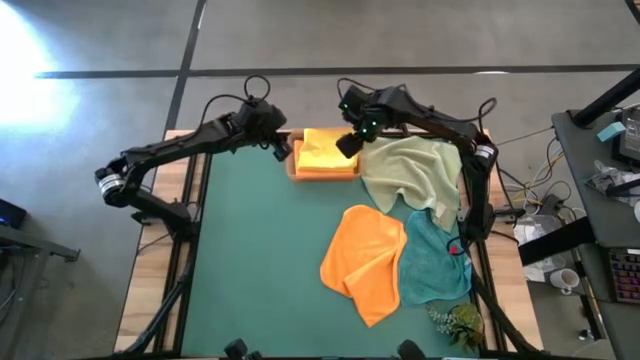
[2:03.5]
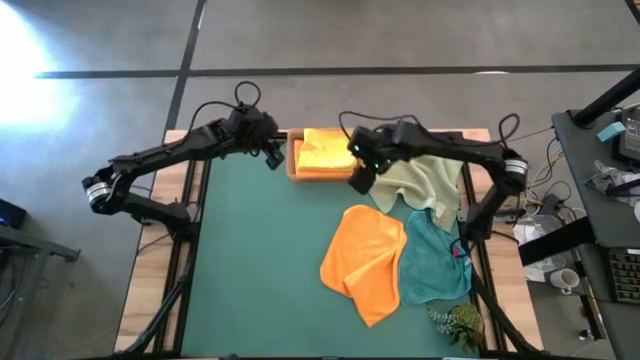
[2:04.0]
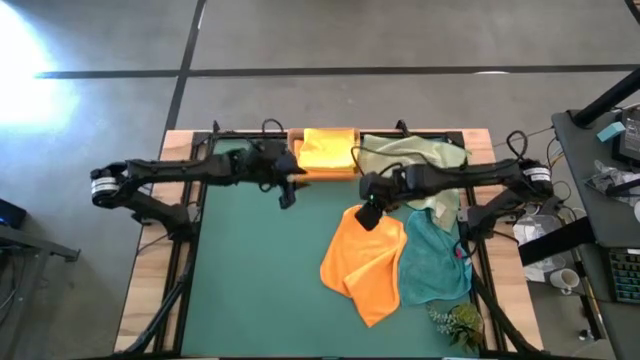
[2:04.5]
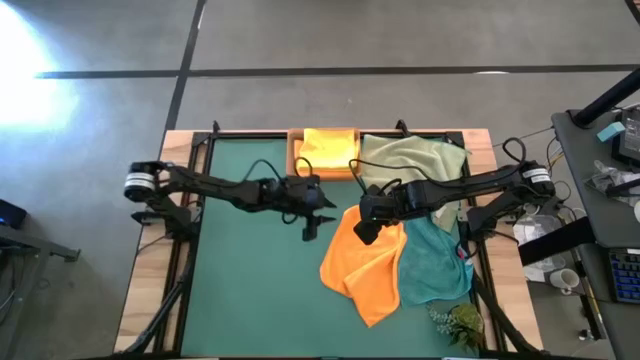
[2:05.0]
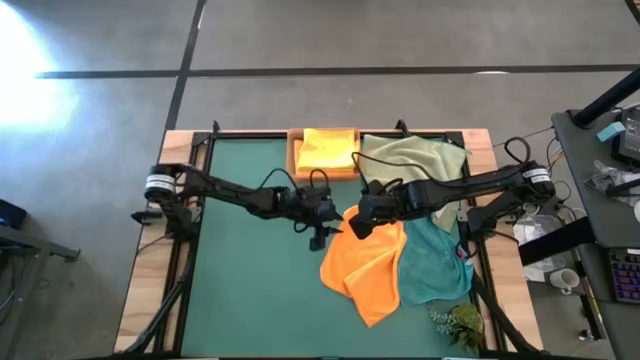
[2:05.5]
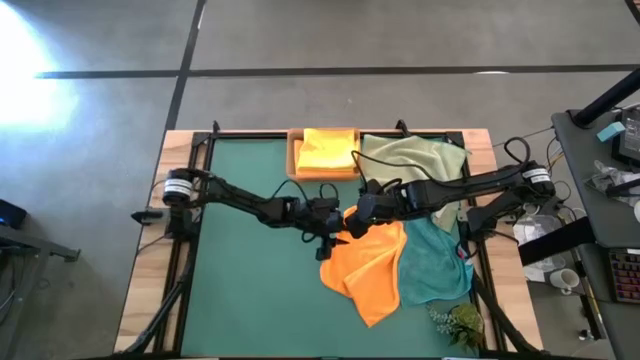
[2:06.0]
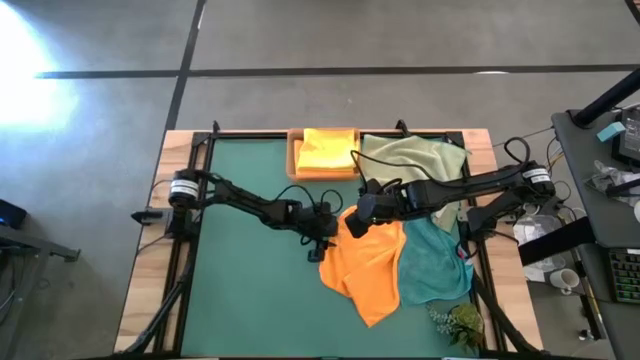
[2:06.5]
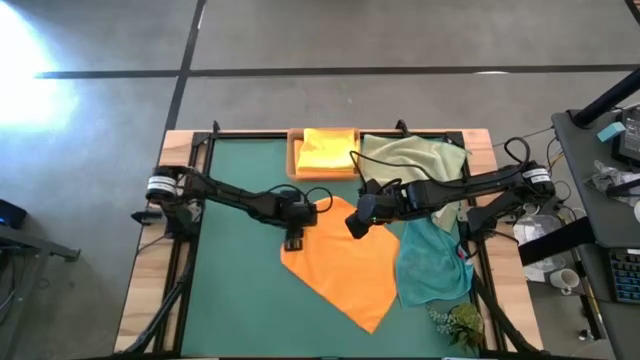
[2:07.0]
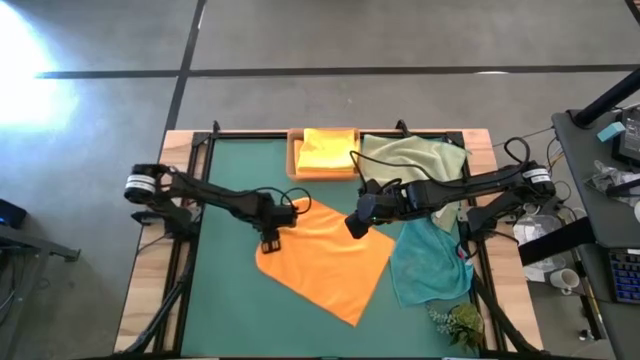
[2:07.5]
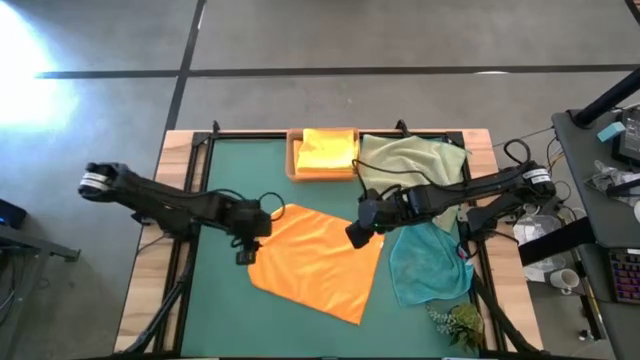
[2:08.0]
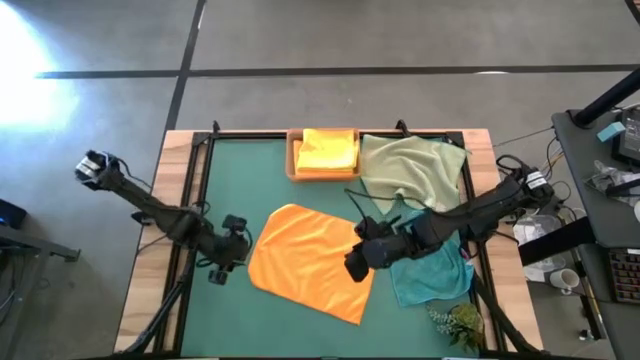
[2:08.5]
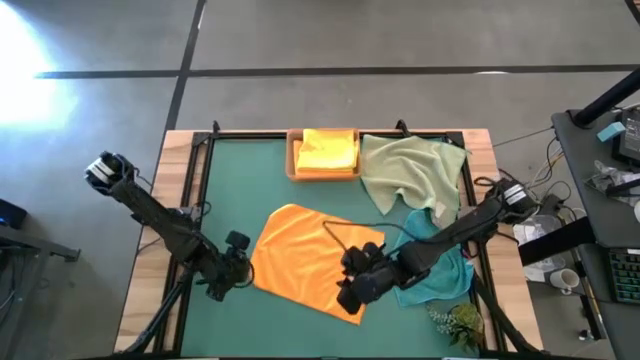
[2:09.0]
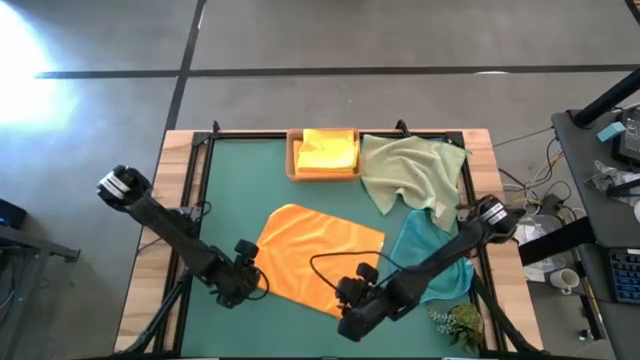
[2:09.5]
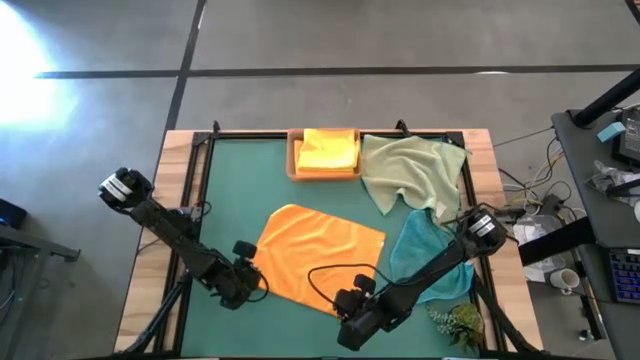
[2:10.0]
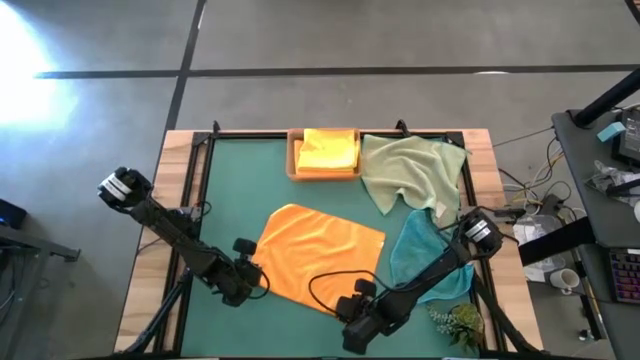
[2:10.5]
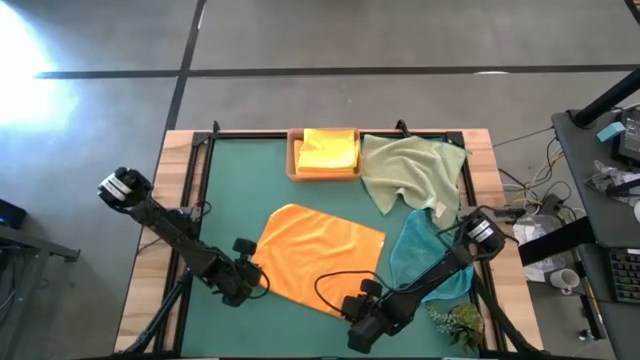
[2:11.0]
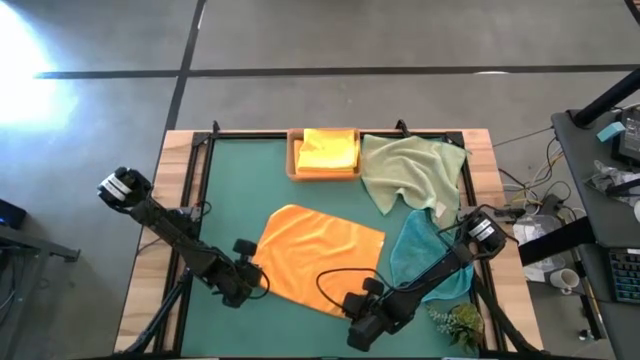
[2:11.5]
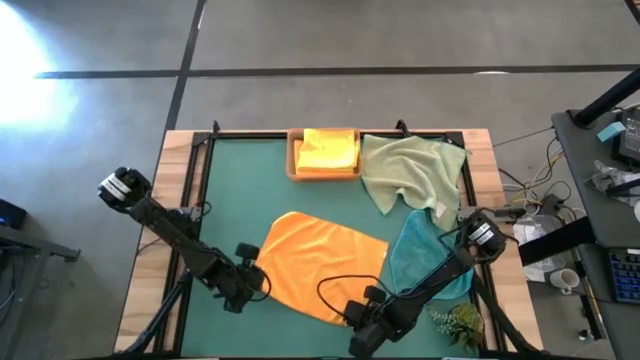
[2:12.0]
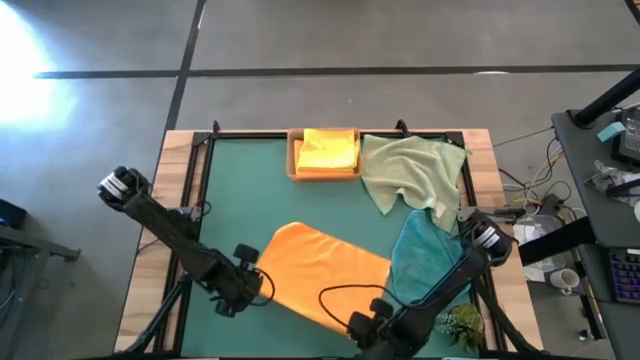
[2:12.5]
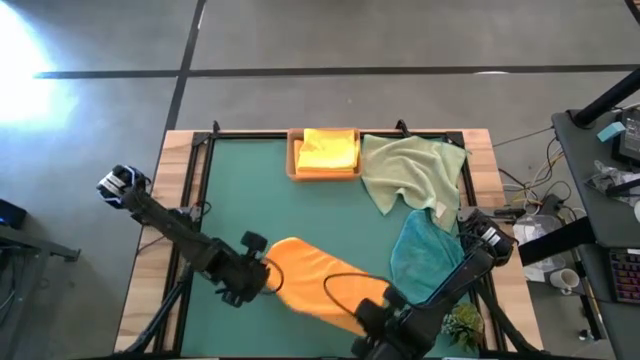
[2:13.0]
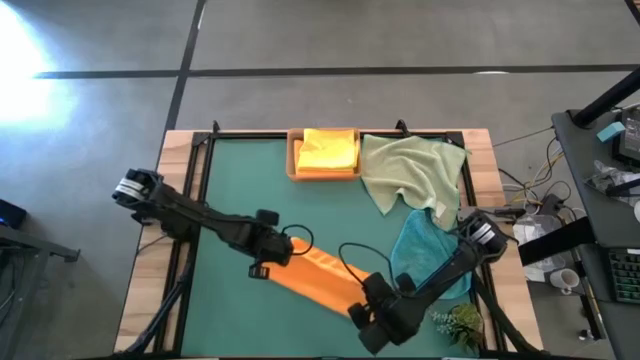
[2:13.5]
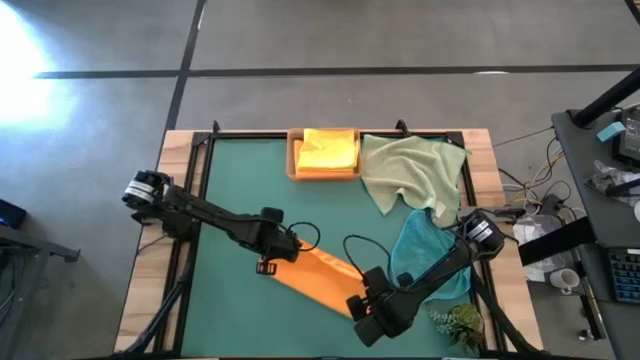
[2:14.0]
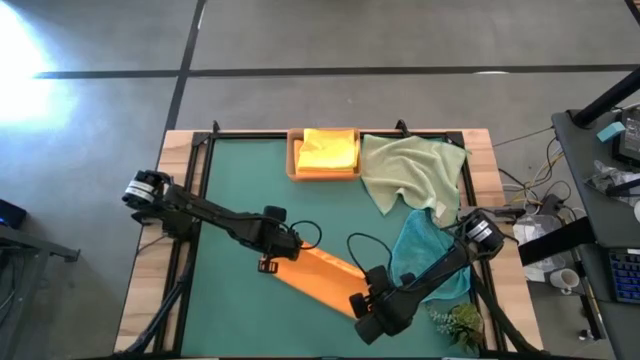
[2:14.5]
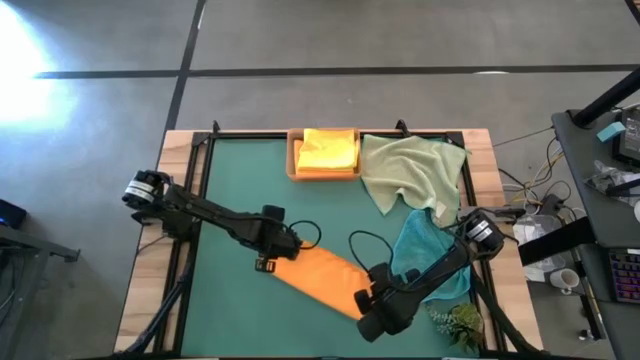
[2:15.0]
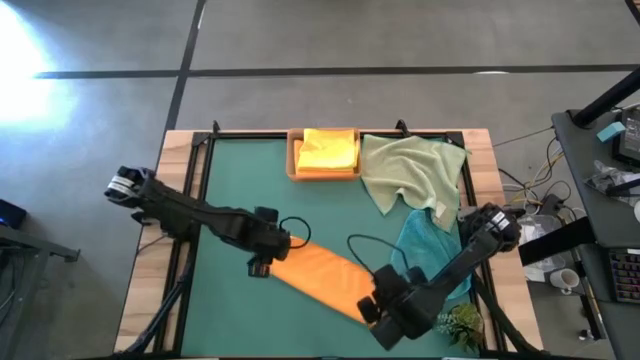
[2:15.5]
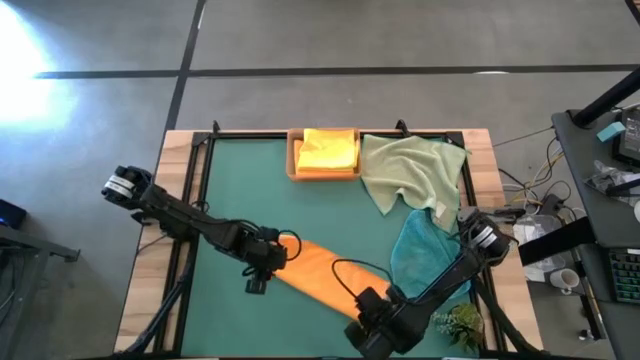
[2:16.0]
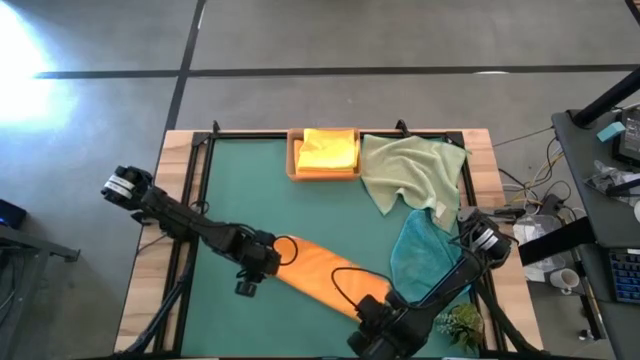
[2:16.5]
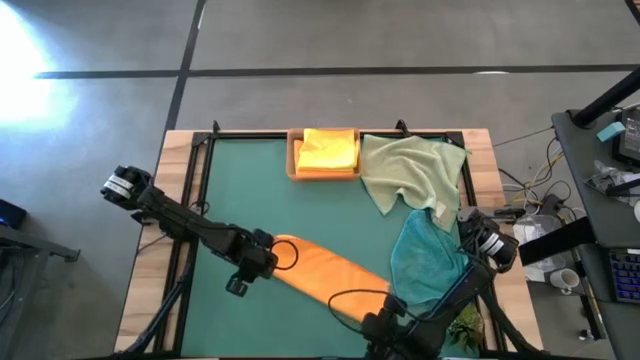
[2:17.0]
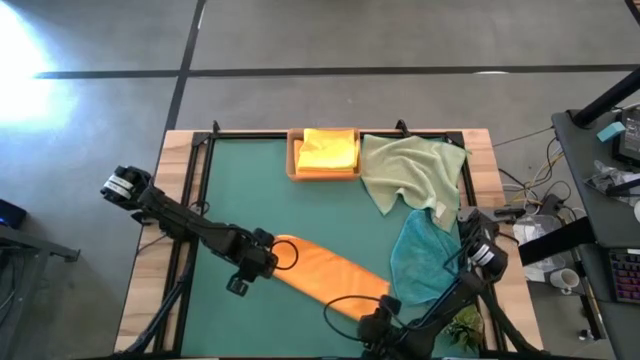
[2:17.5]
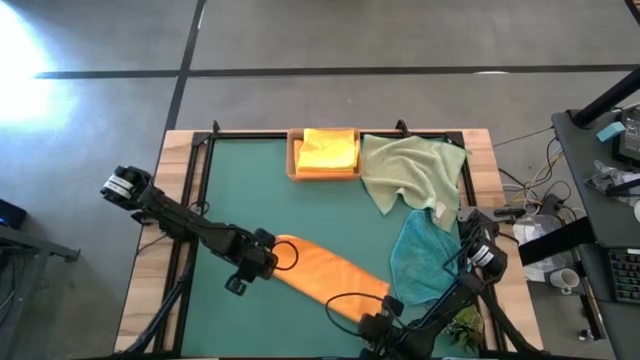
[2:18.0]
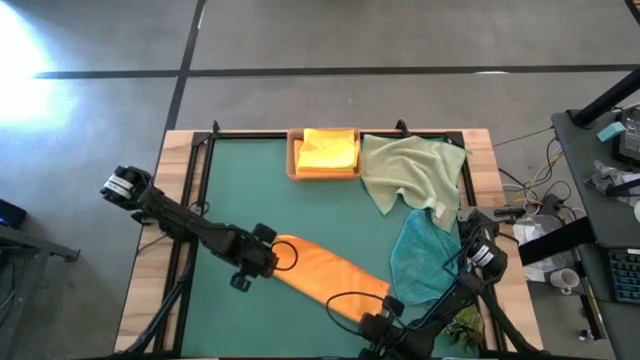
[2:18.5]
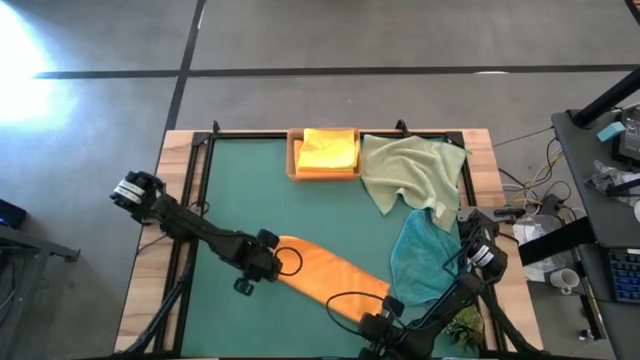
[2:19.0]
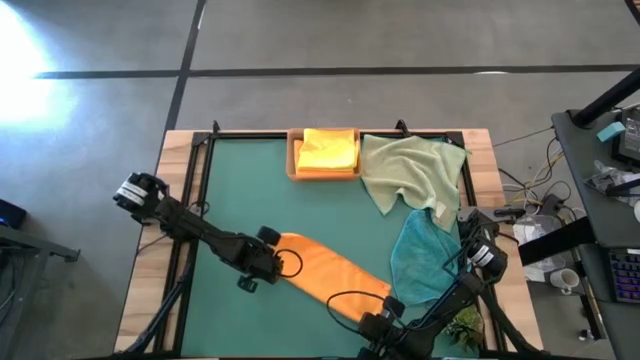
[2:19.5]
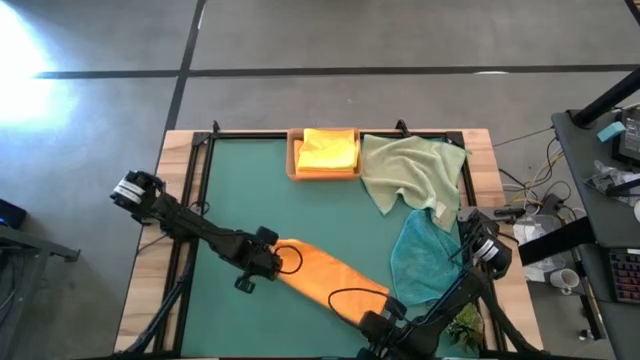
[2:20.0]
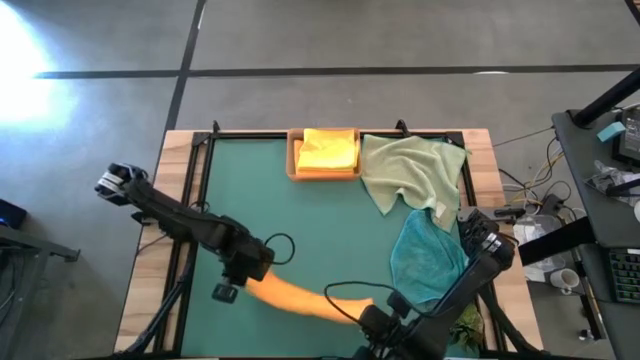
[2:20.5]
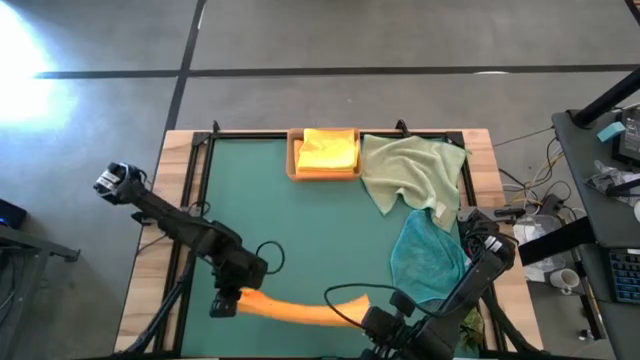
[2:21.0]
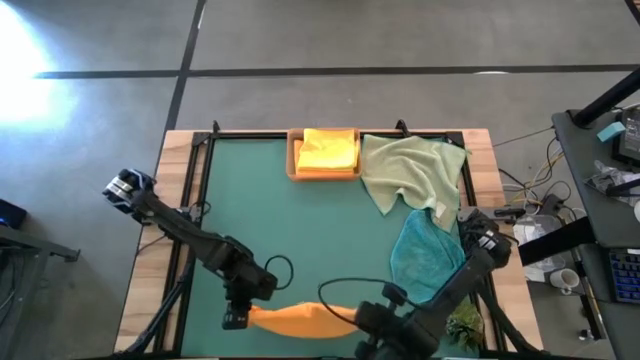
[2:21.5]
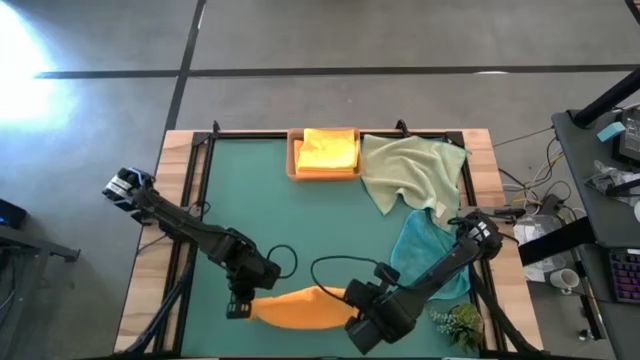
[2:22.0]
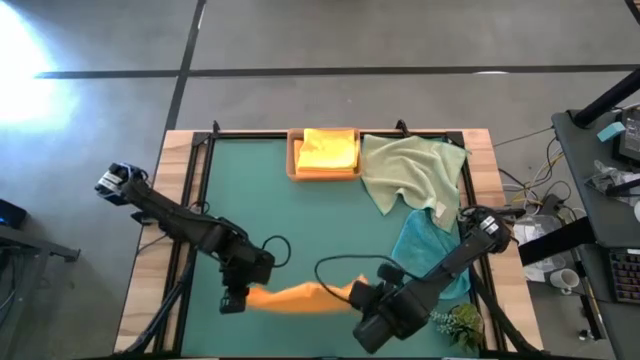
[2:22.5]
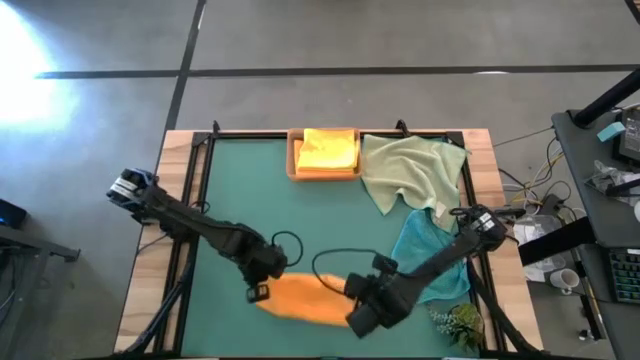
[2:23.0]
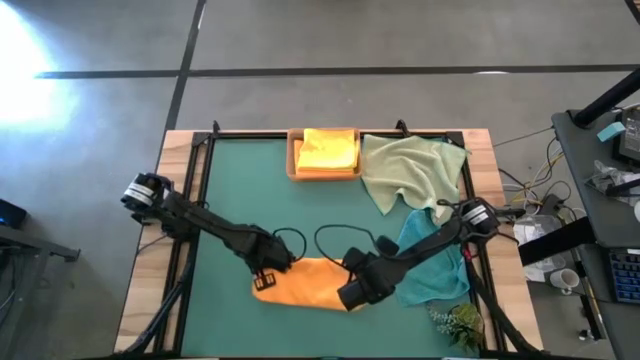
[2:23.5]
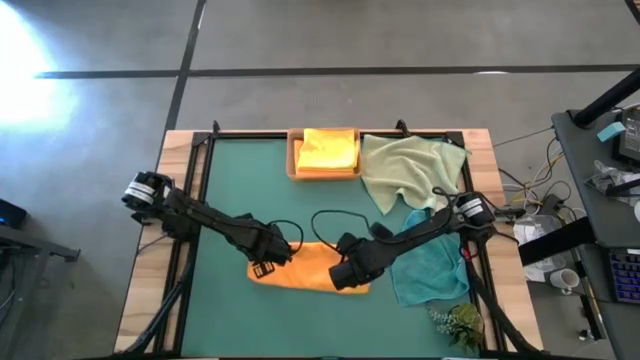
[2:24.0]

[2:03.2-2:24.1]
Task: Fold microfiber towels
Fold the orange towel
